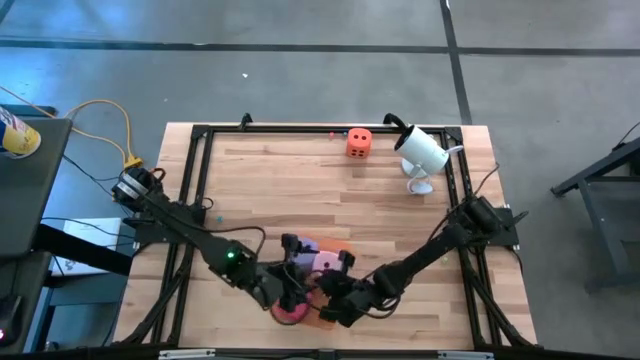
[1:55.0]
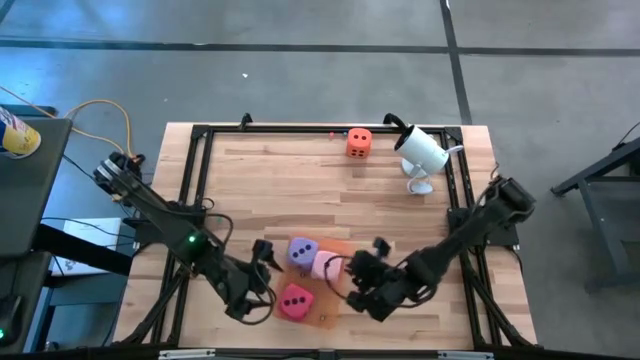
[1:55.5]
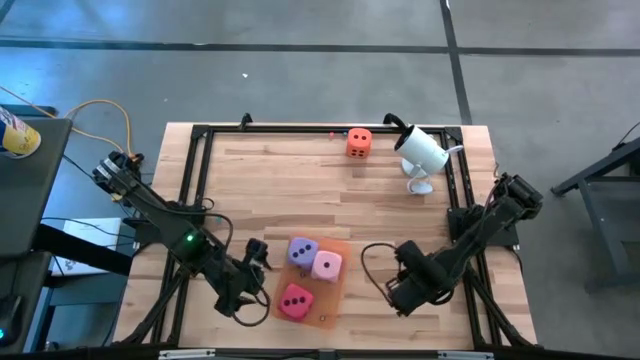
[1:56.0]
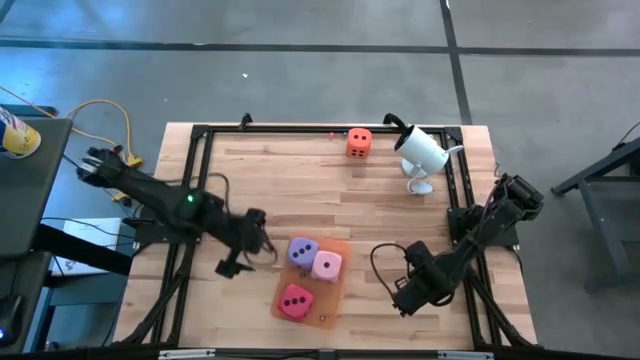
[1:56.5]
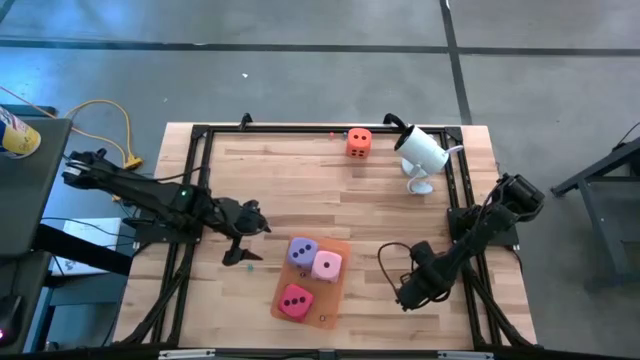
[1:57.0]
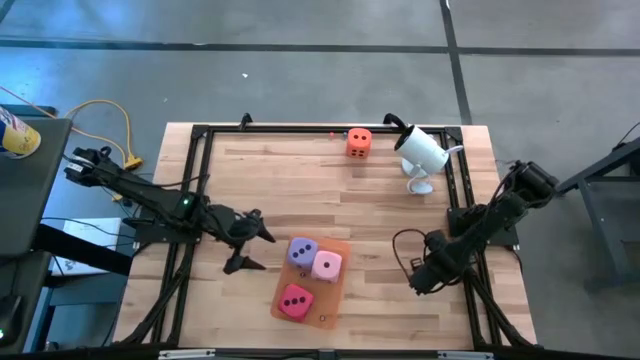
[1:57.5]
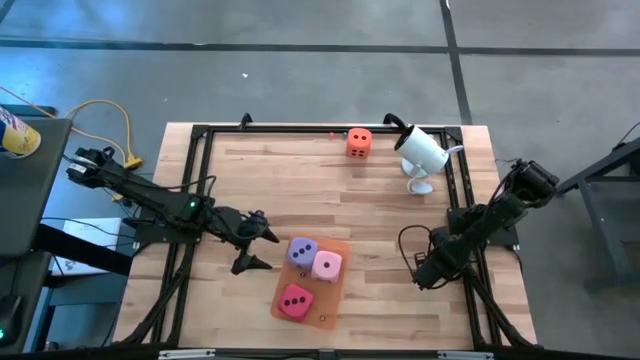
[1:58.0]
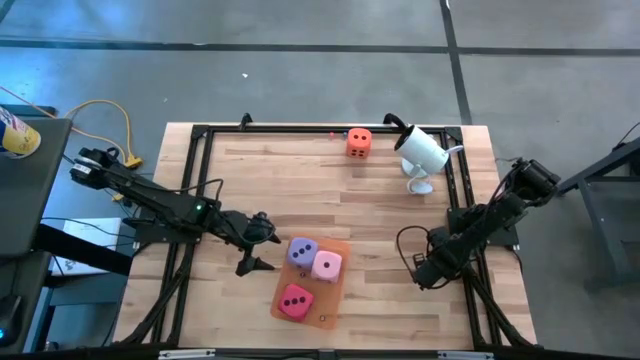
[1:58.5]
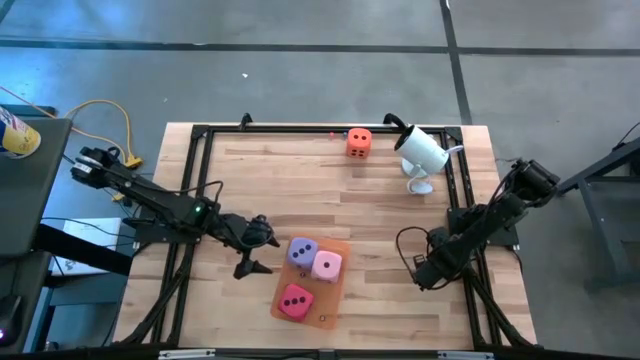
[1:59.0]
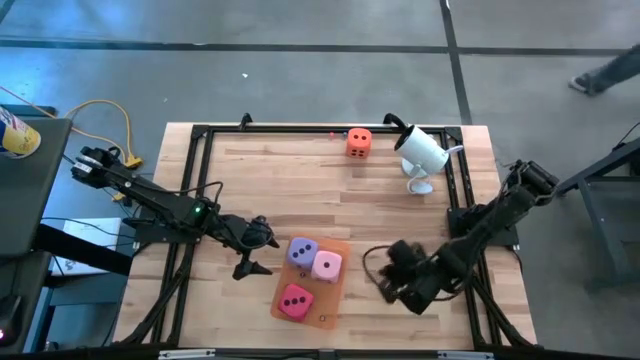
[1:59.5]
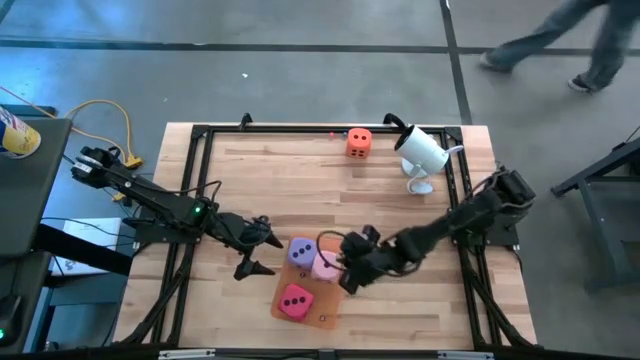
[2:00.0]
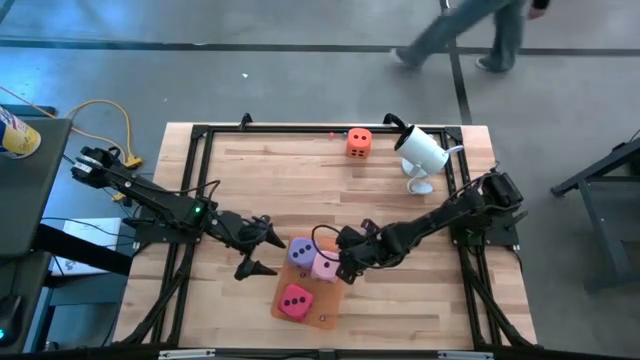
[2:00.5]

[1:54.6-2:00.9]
Task: Pick & Place Dice
Put the small light green dice into the orange bin

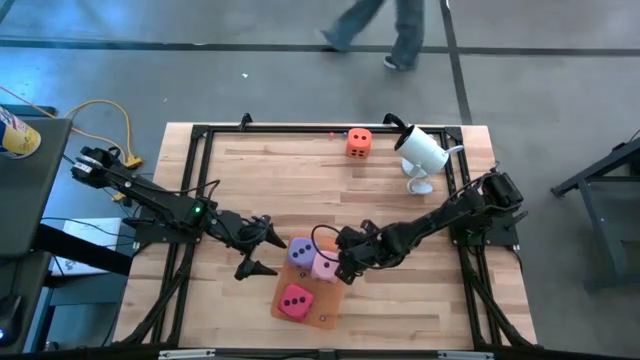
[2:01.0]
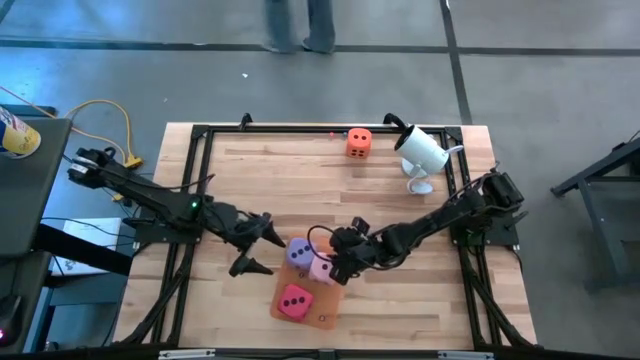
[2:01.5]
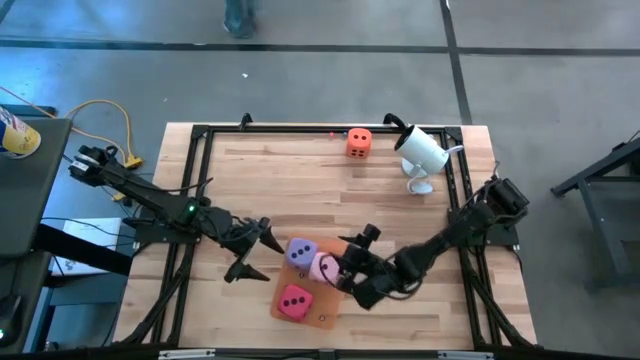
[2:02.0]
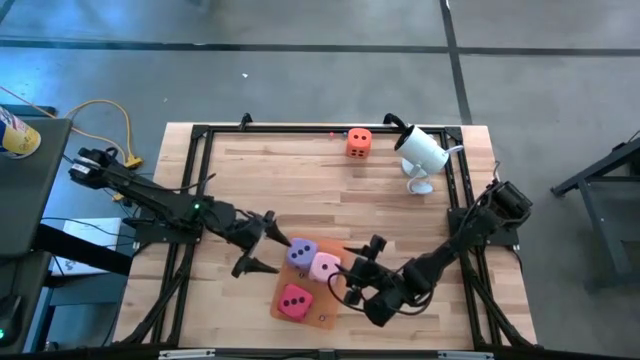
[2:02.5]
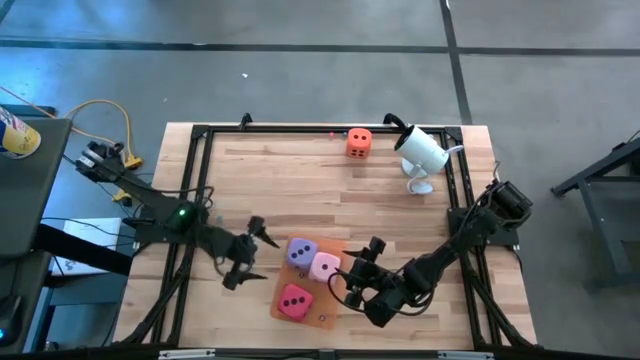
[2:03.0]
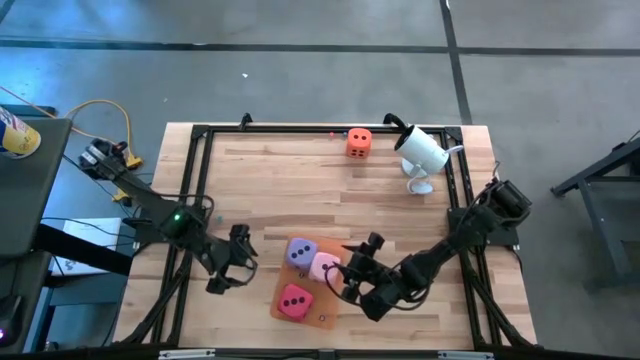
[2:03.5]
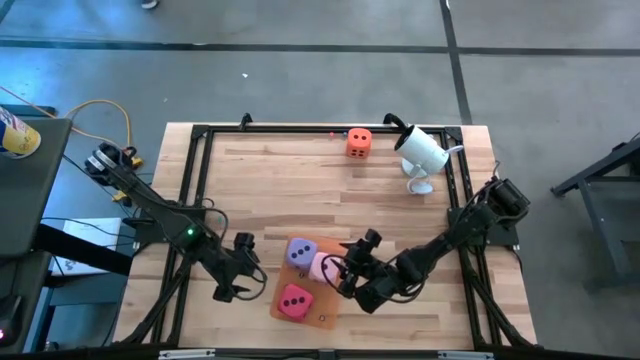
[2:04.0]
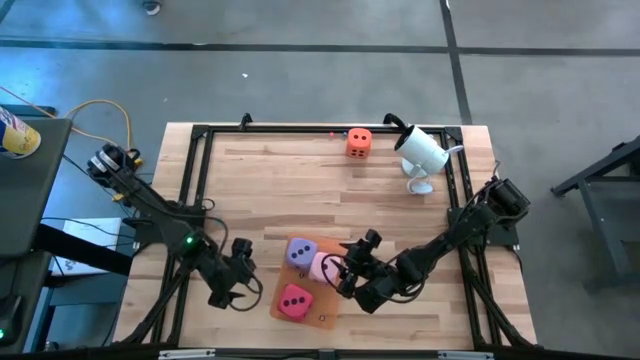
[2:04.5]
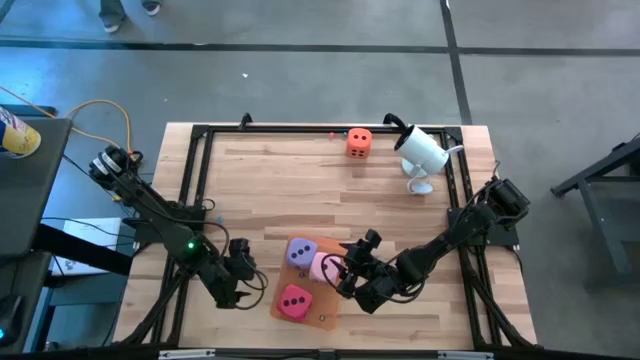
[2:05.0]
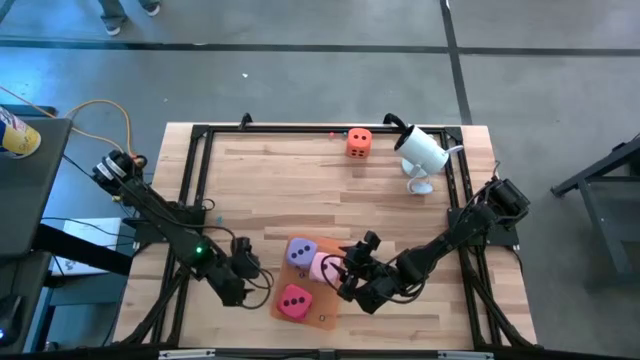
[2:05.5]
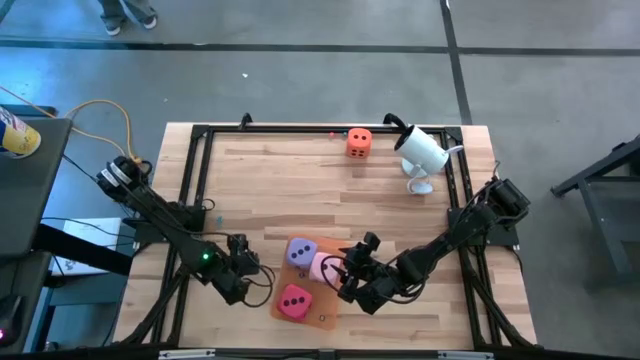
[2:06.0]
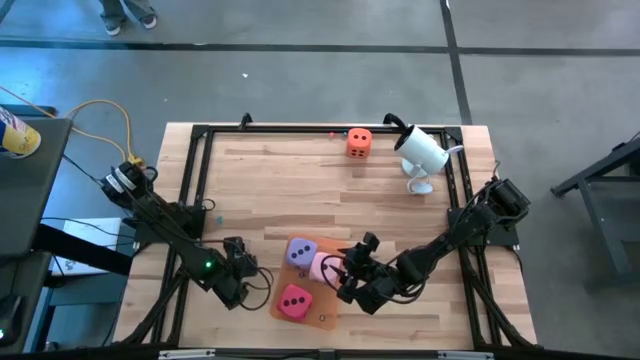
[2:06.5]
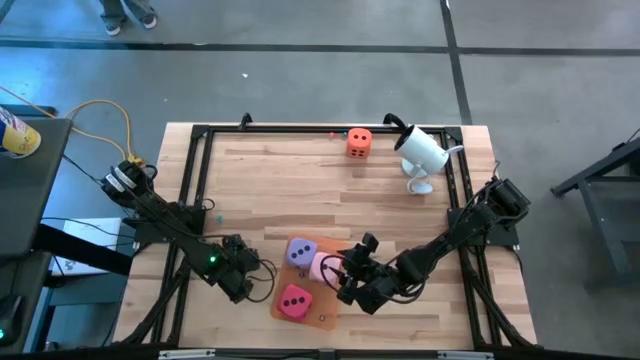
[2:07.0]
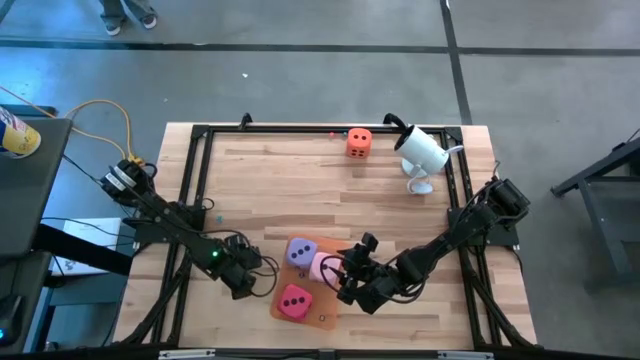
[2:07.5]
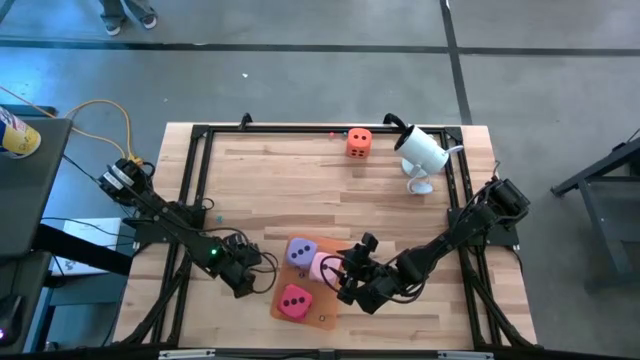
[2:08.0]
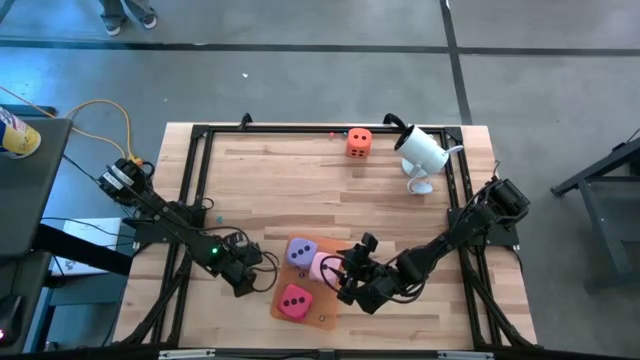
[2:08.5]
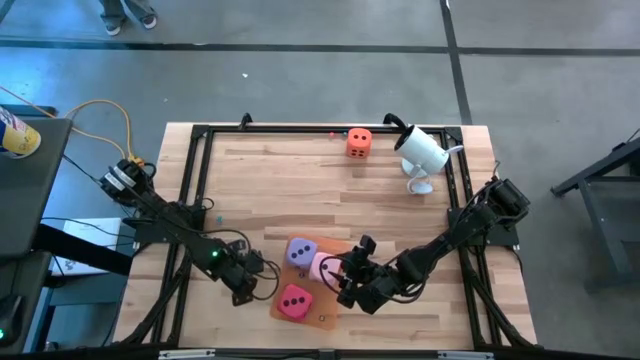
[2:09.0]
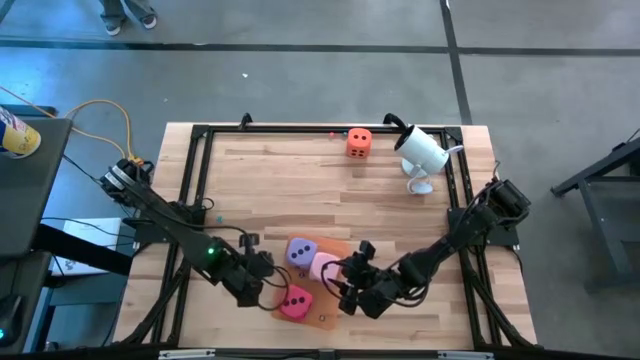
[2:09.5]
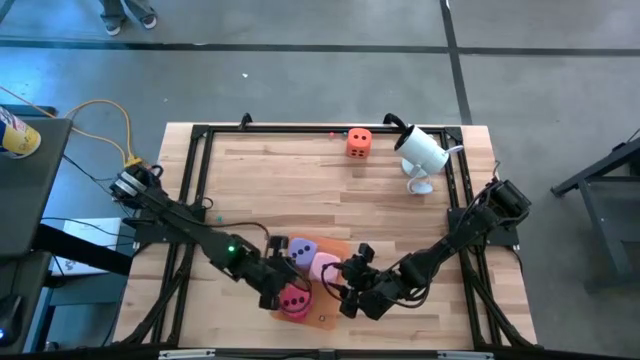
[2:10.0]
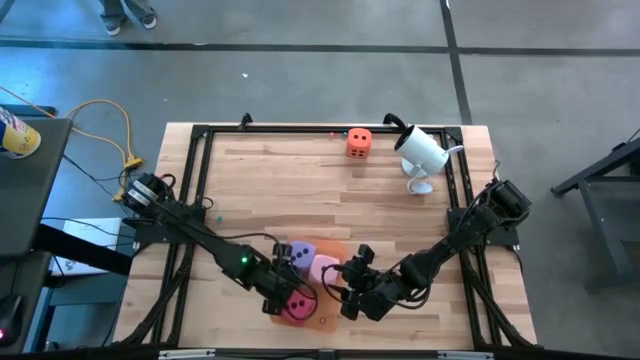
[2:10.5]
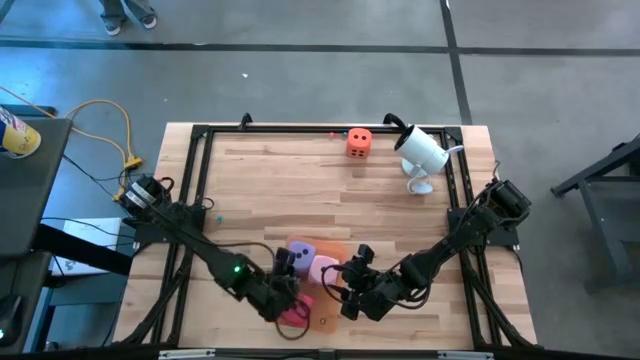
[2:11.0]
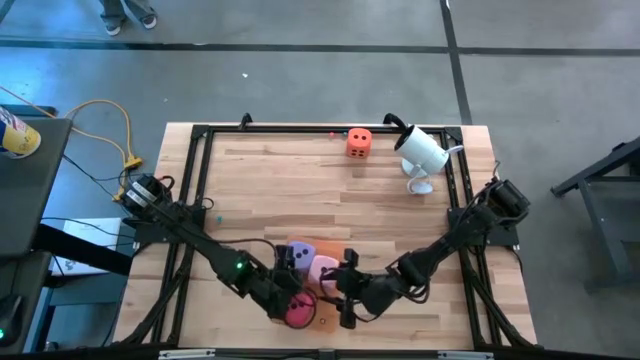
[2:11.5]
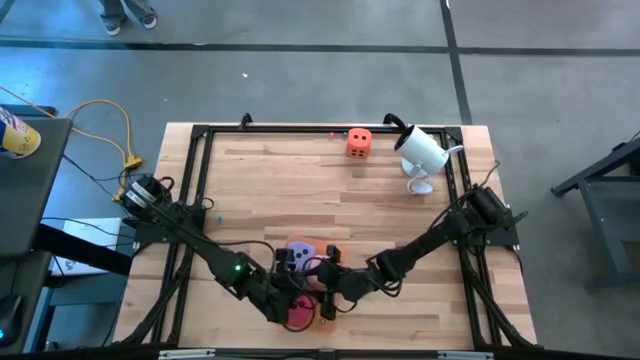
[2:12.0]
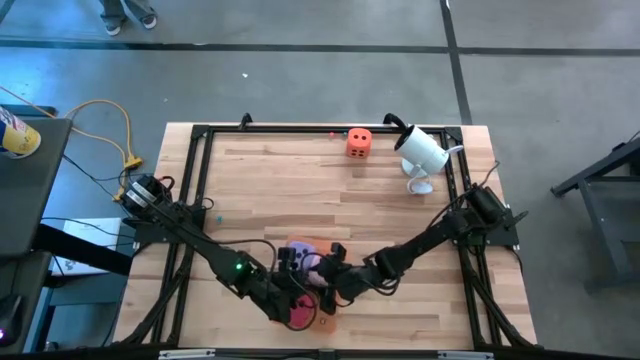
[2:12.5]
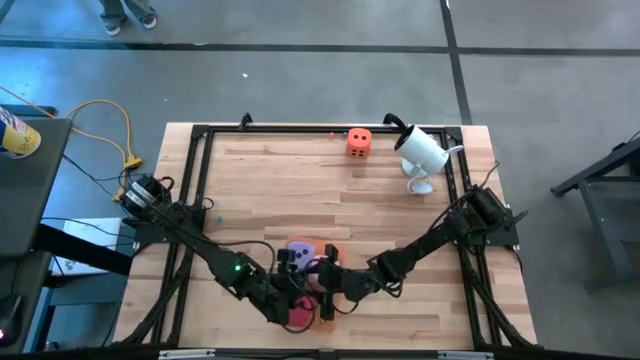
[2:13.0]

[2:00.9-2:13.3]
Put the bottom small light blue dice into the orange bin

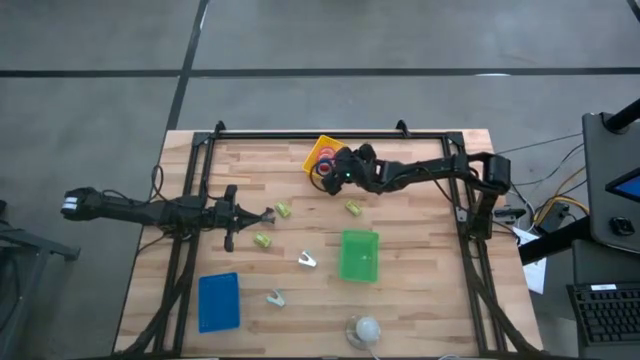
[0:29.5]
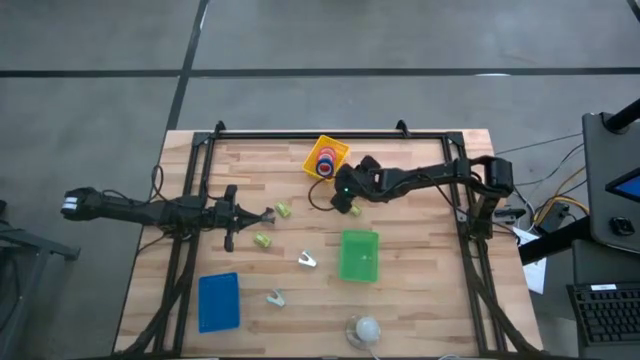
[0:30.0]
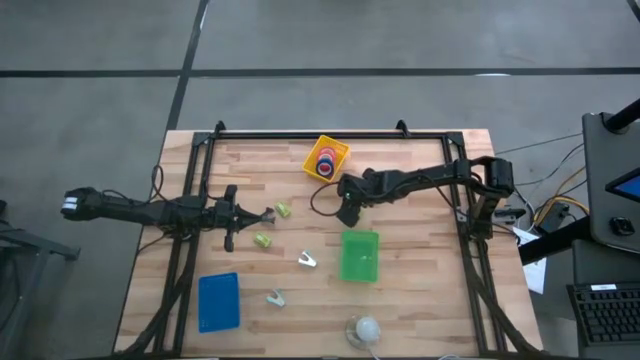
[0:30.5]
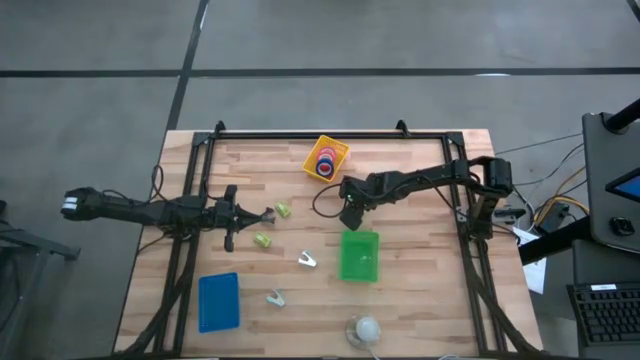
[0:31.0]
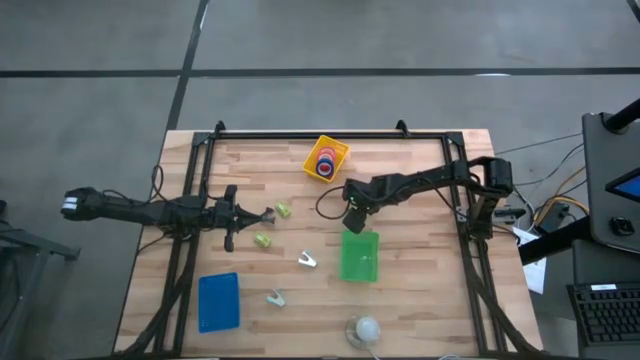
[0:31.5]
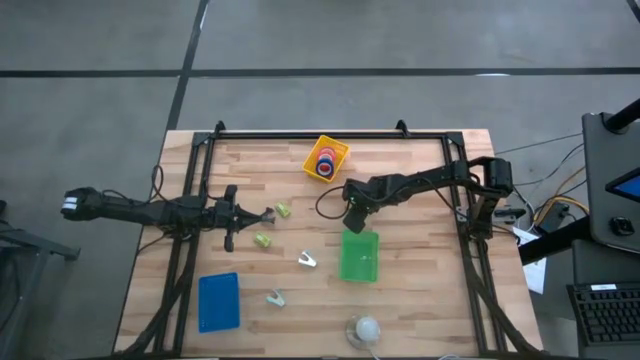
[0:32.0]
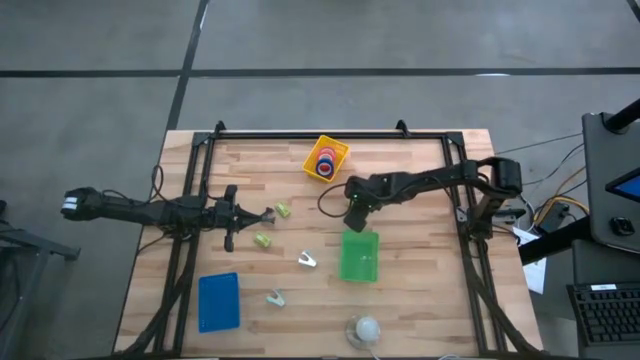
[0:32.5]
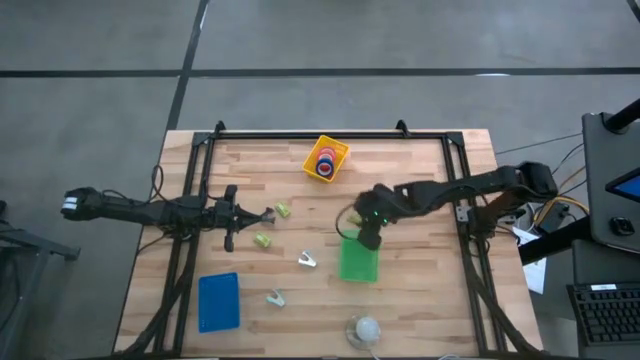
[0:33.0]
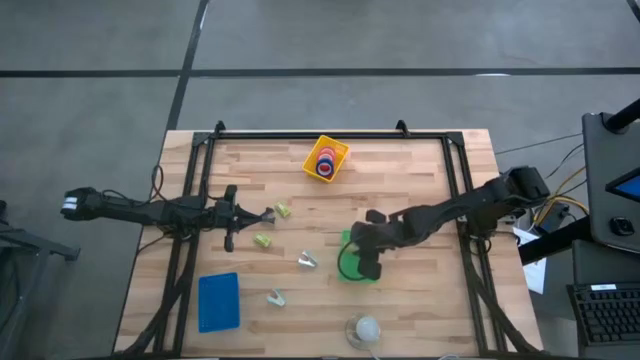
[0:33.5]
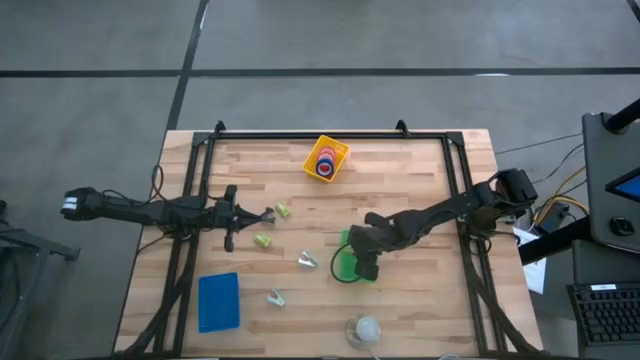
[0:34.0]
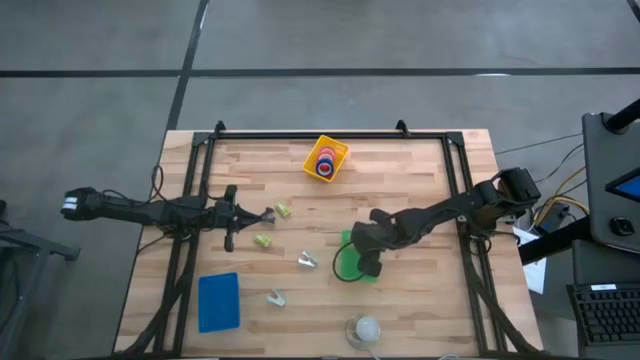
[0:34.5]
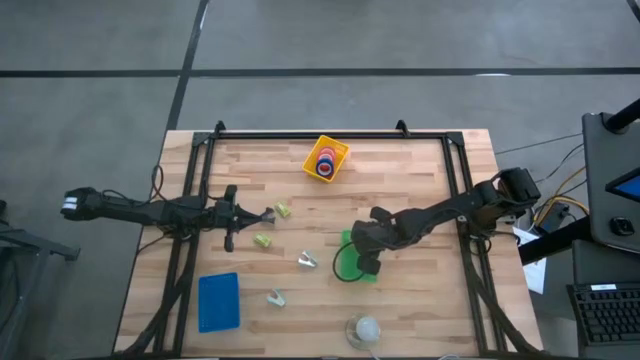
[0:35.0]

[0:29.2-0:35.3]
Task: Pick and place Stapler, Stapler remover, tape
Put the top right green staple box into the green bin
